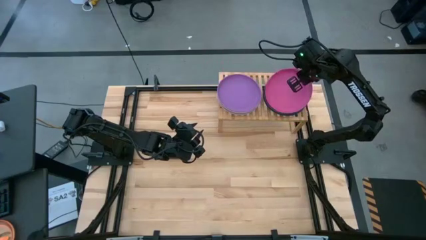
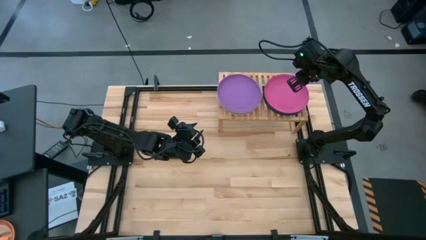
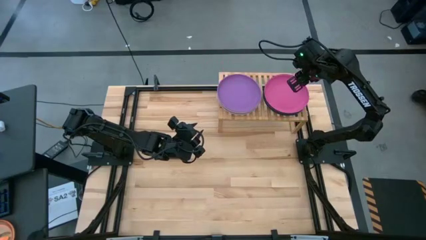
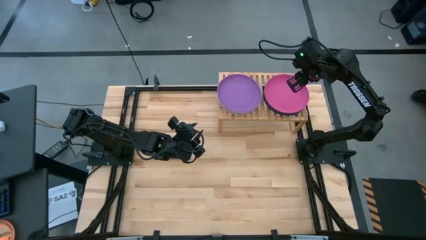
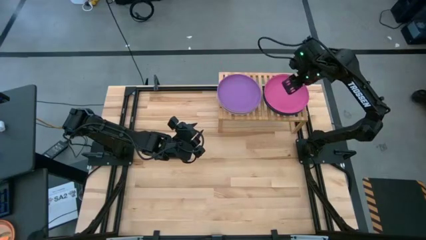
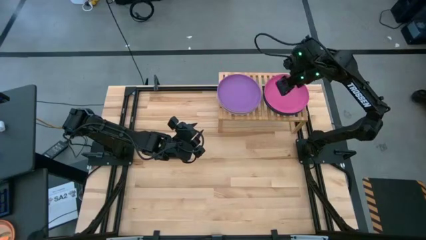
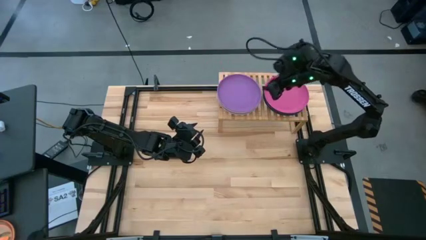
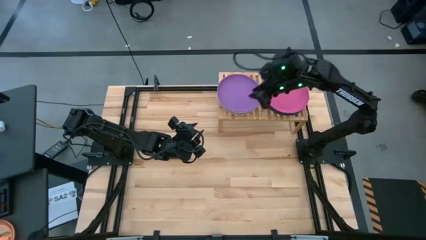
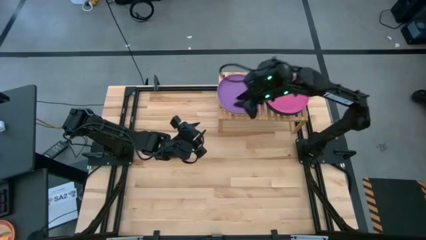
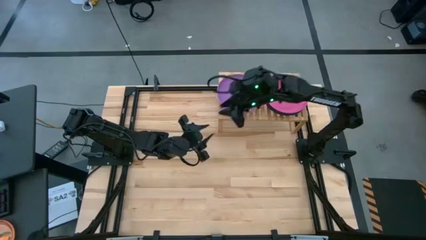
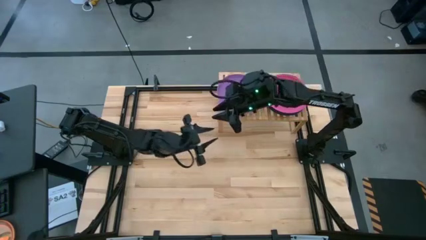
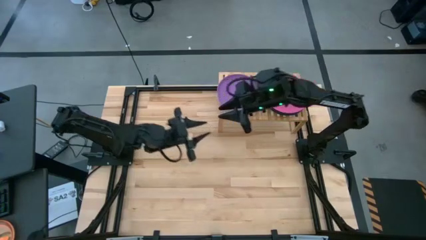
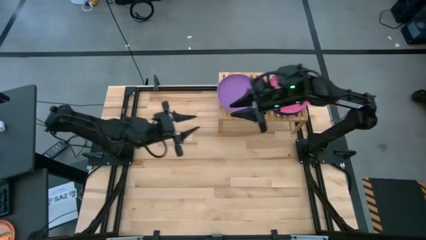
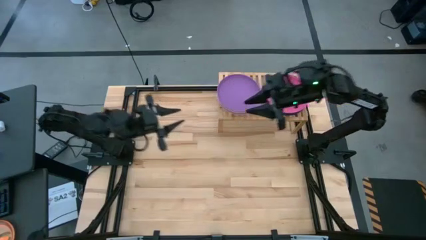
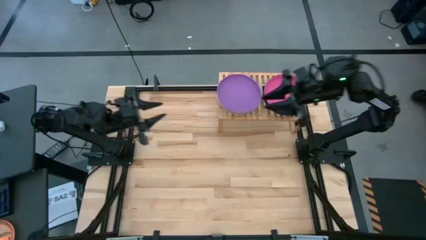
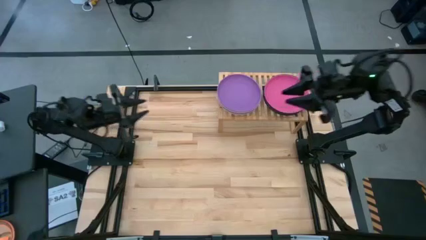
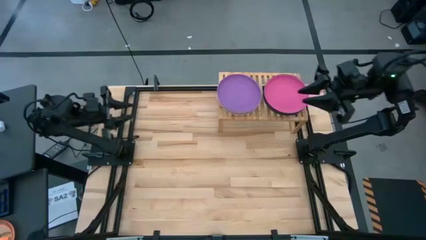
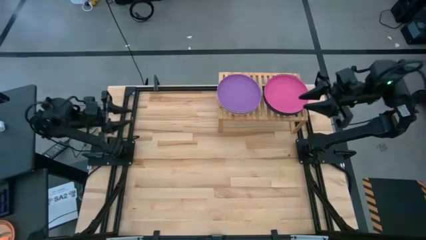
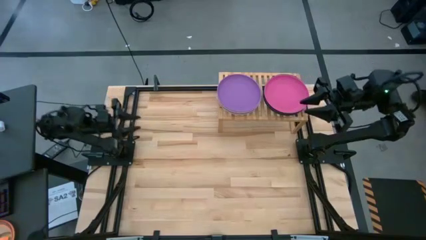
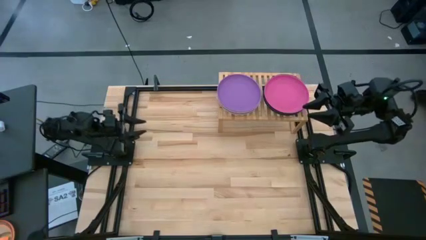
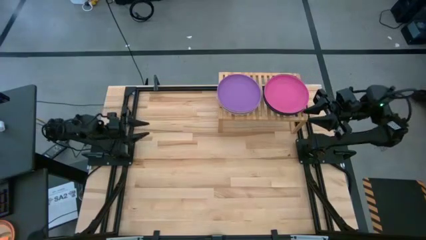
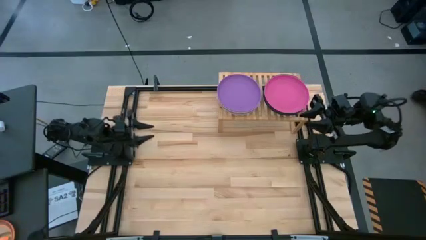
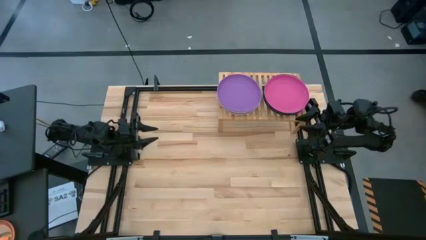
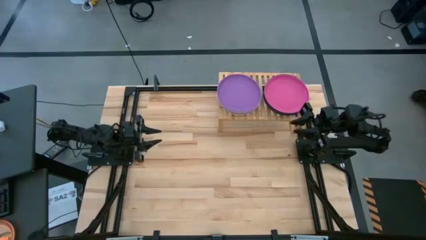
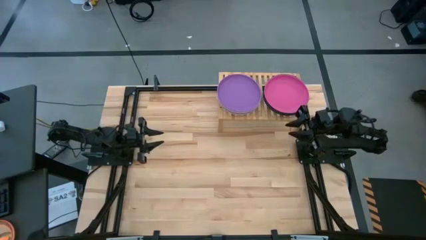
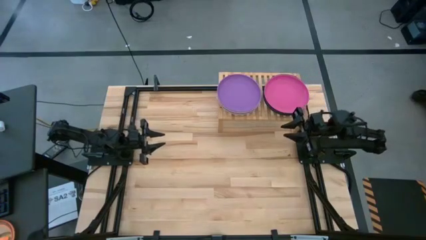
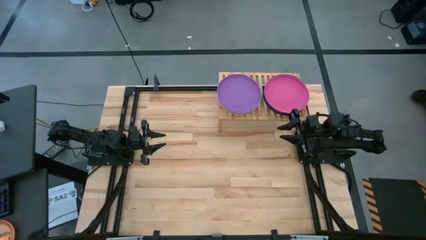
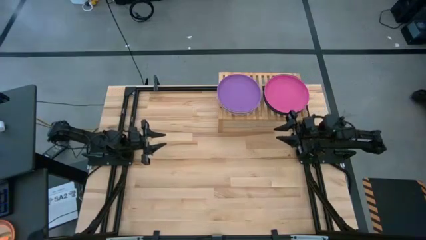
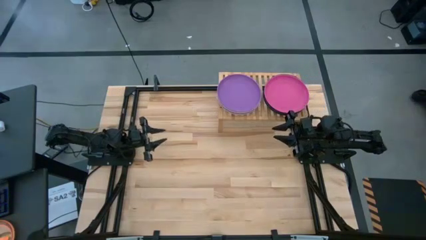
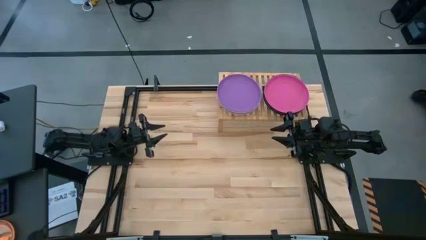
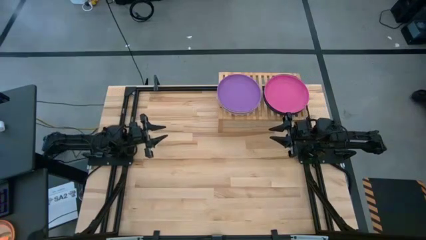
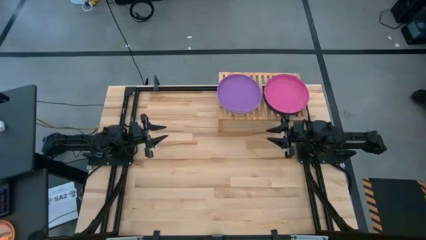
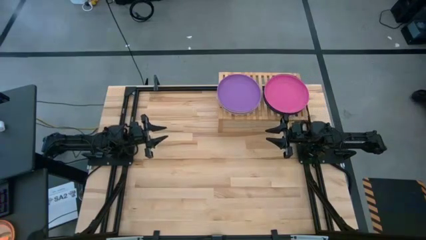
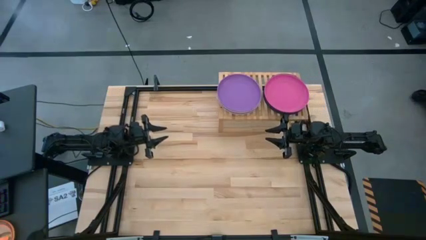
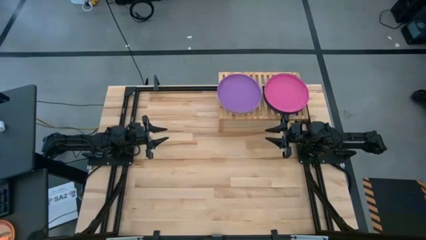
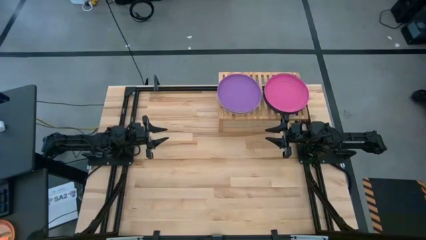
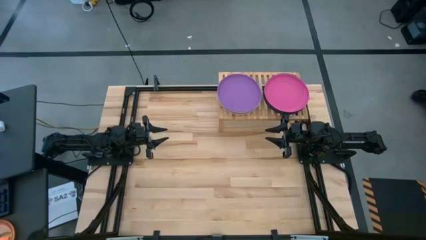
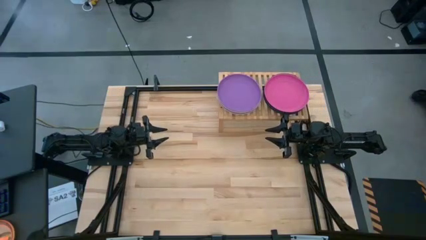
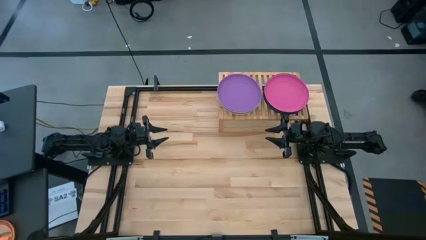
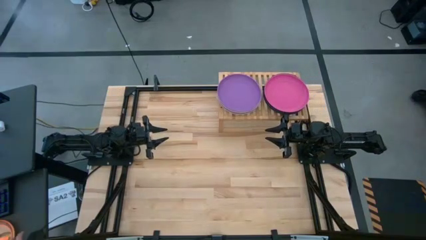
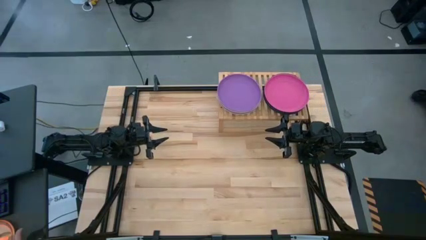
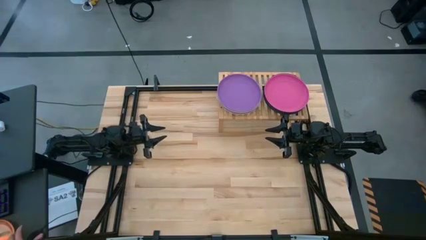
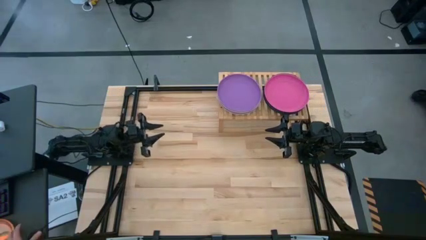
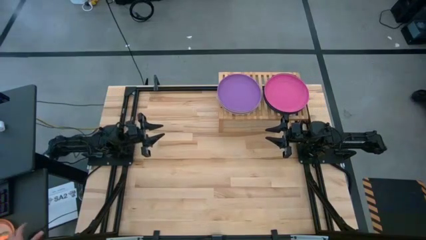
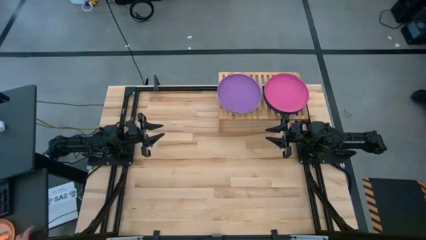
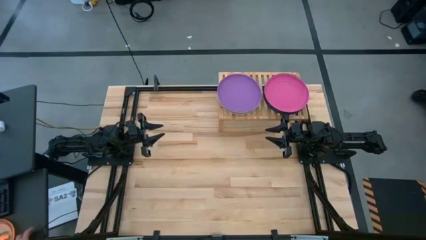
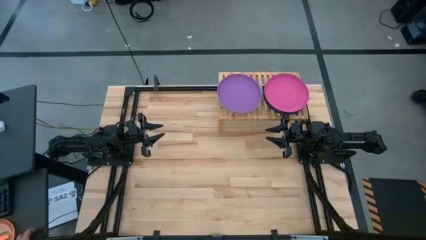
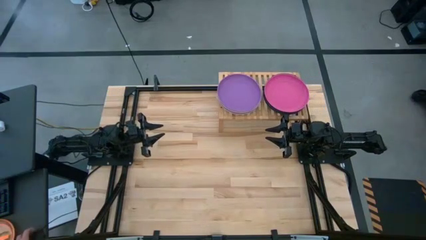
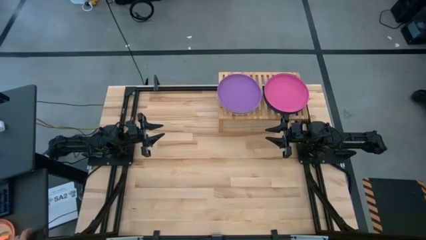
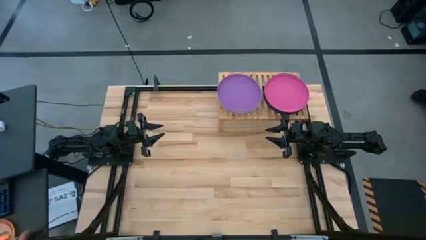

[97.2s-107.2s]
Task: Place and stack plates onto a shelf
Return to Home Position

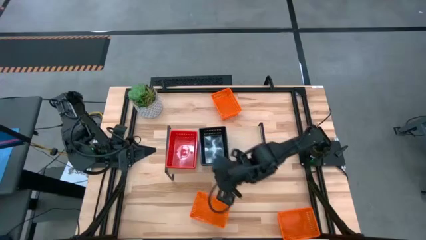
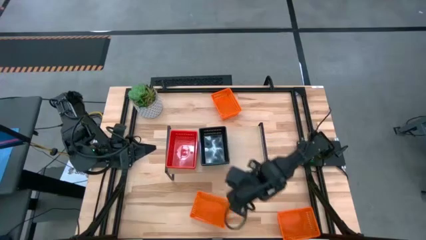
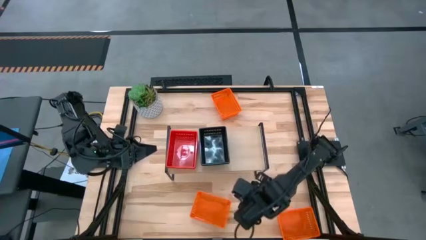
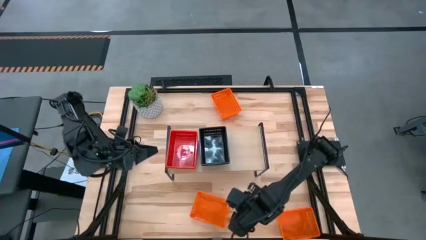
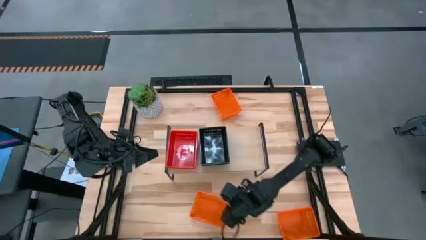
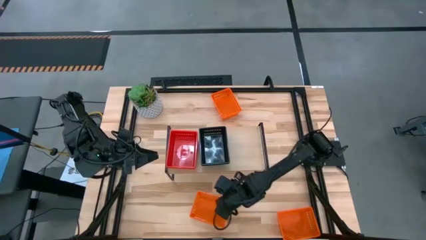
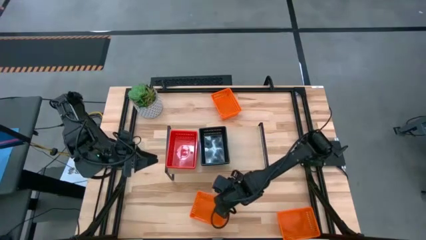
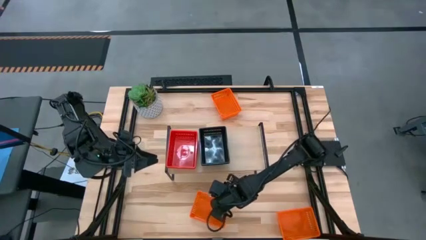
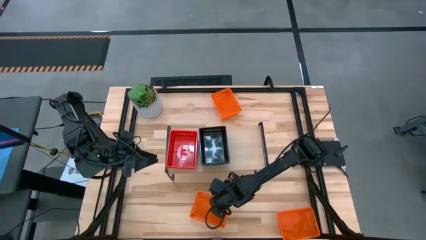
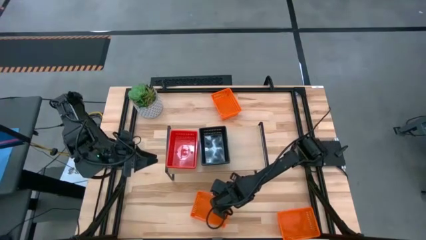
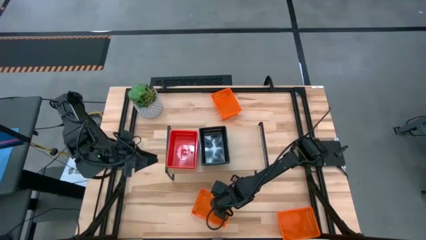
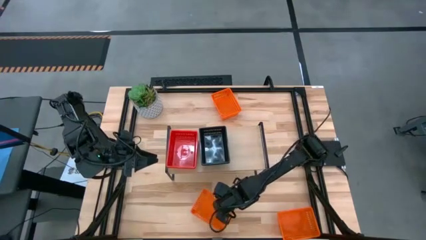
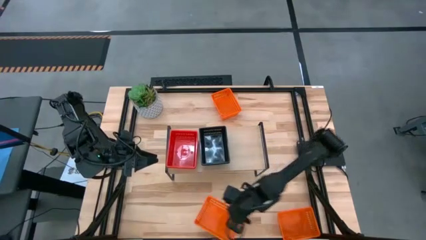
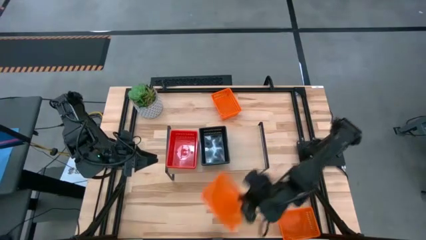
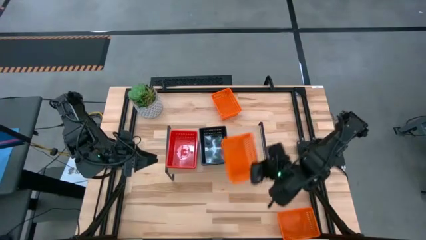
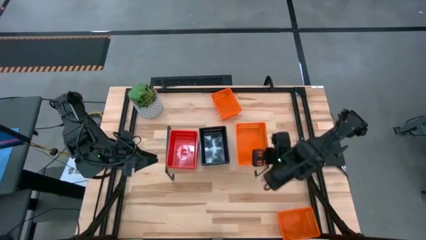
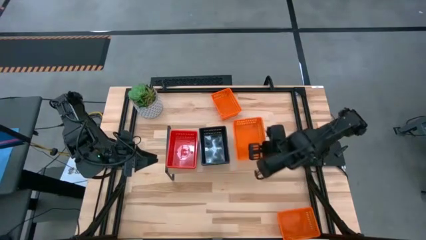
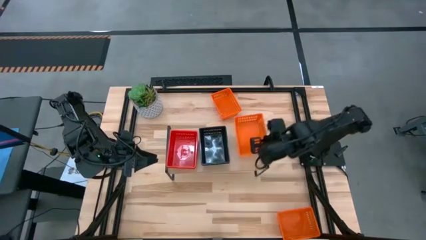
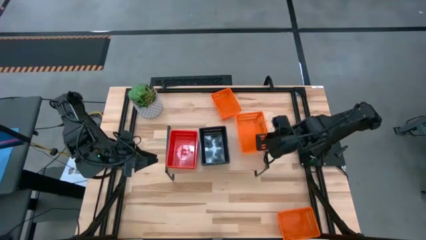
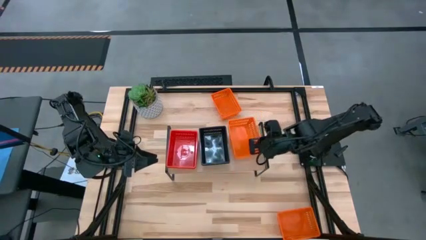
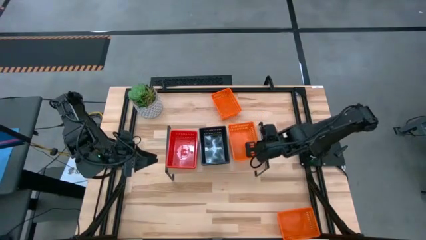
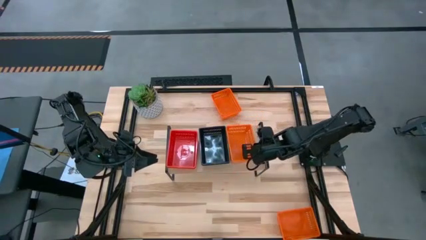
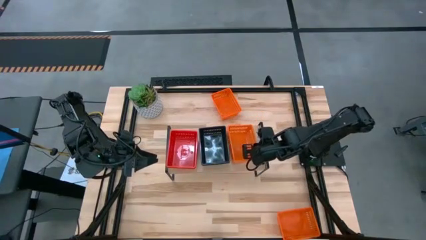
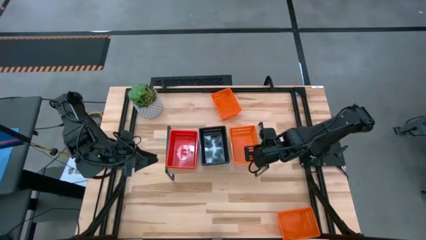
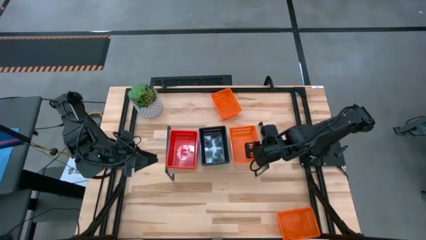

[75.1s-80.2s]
Task: Stack baskets on shelf by color
Put the bottom left orange bin on the shelf
